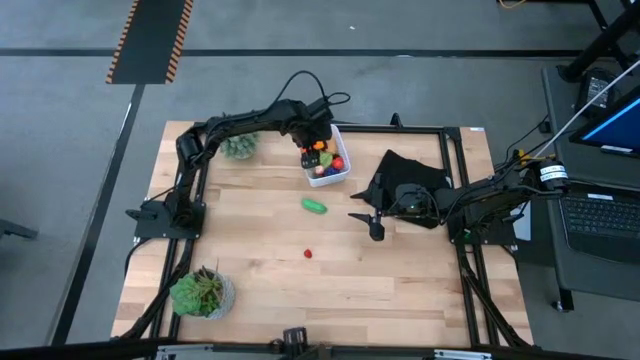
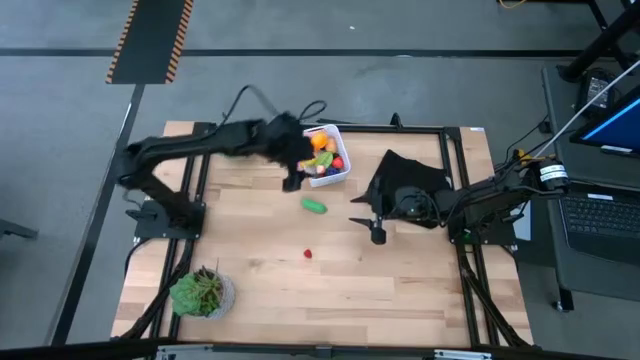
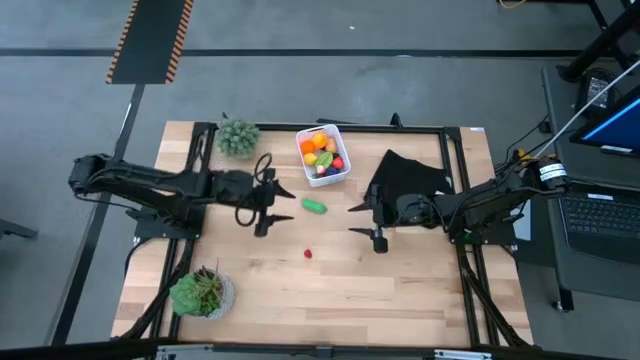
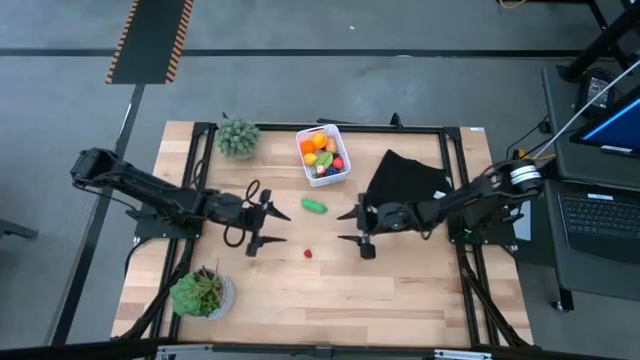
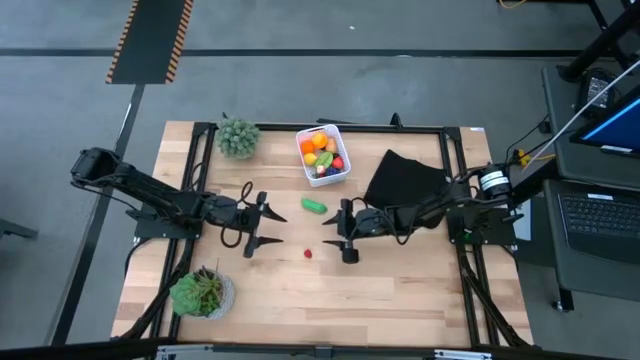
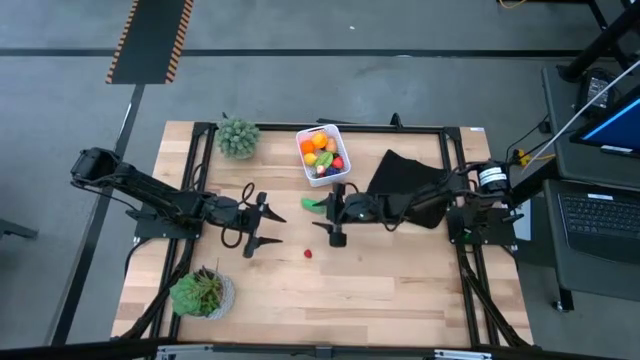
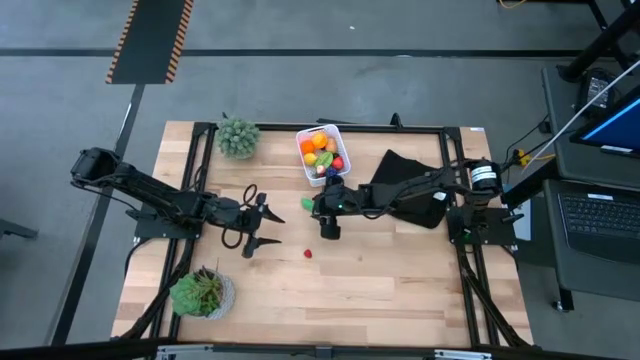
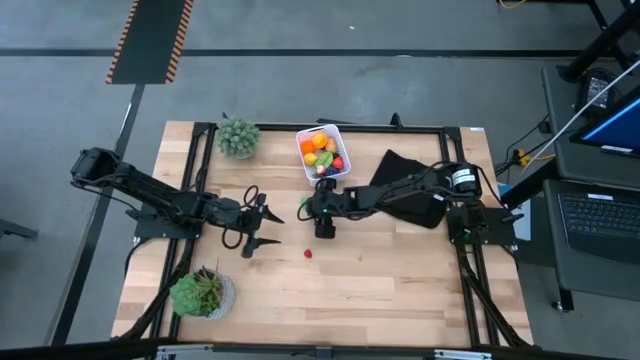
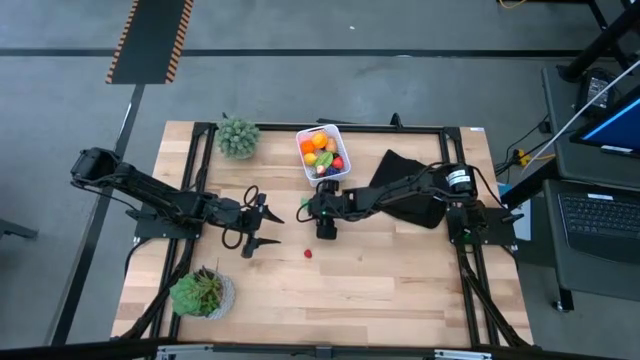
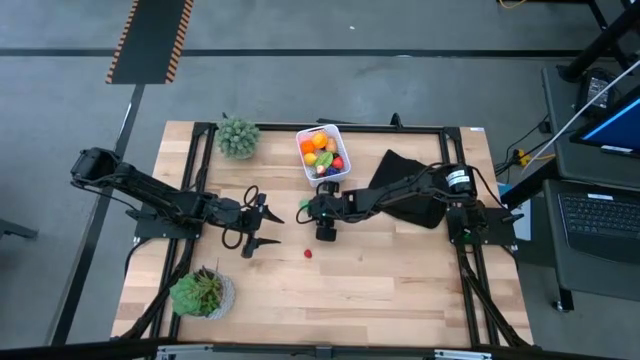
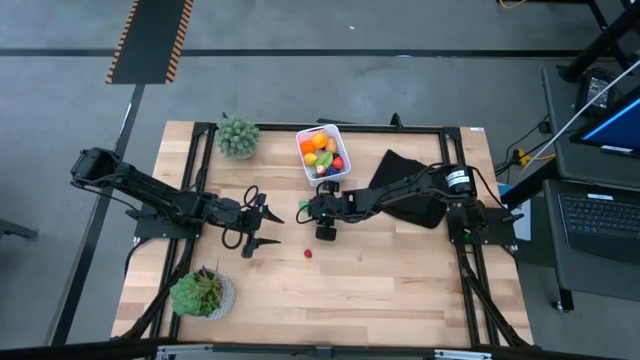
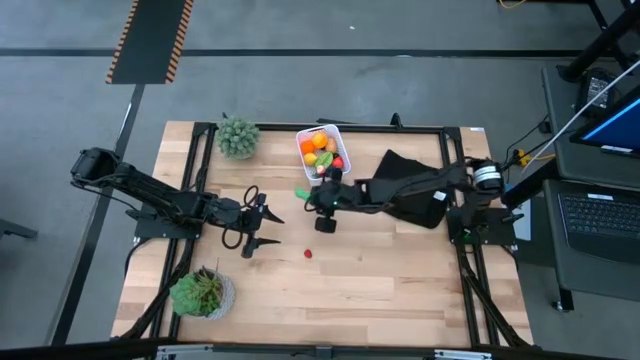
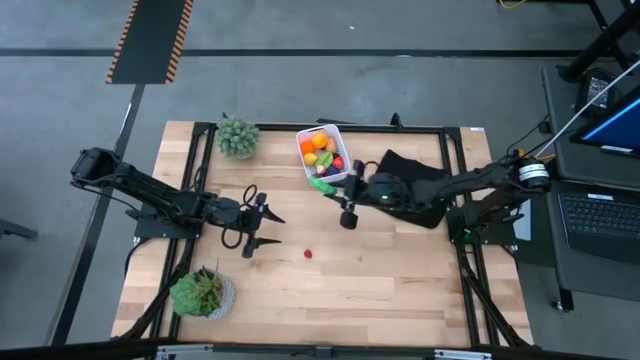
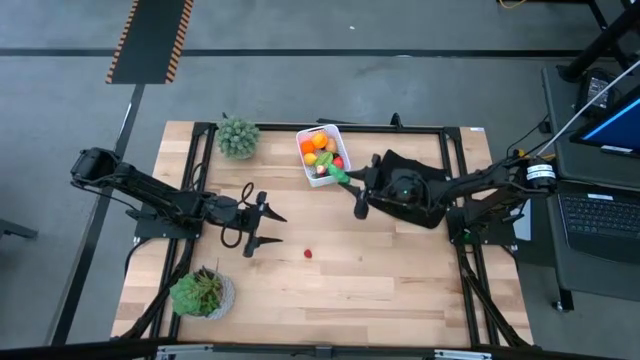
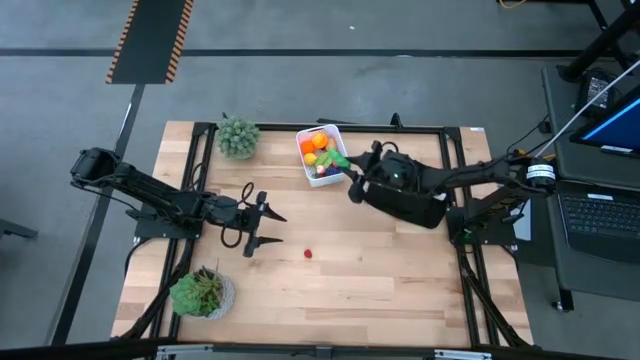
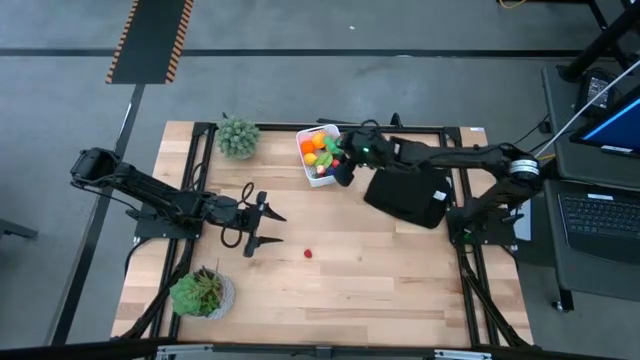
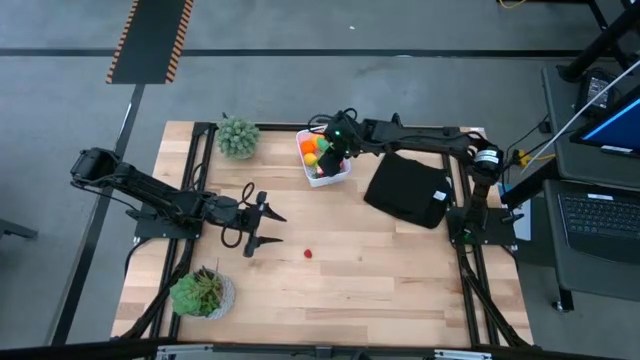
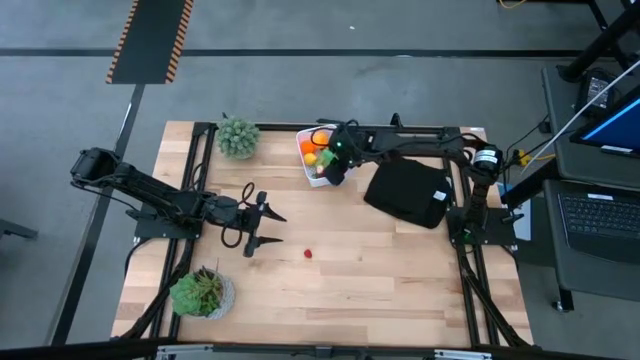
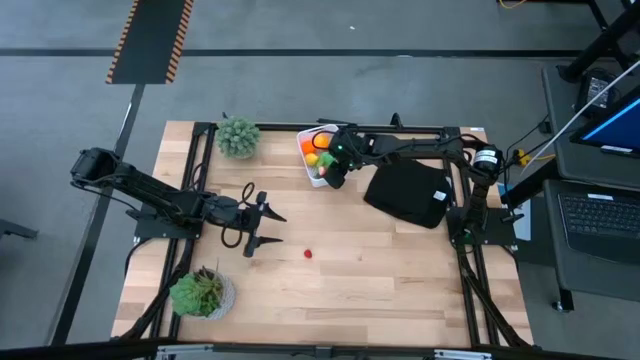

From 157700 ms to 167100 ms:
Task: Pick and placing Produce into tupperware
Put the pea into the basket

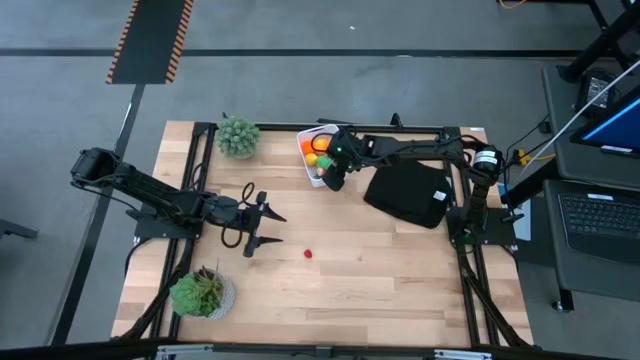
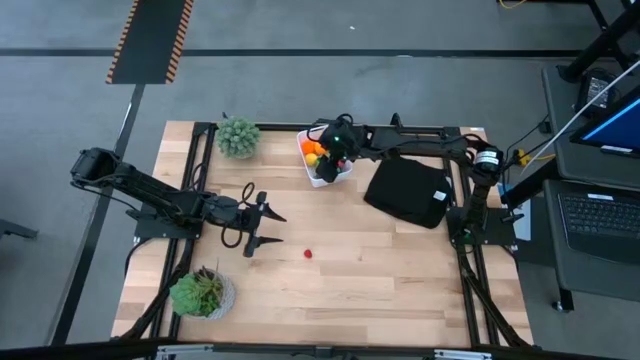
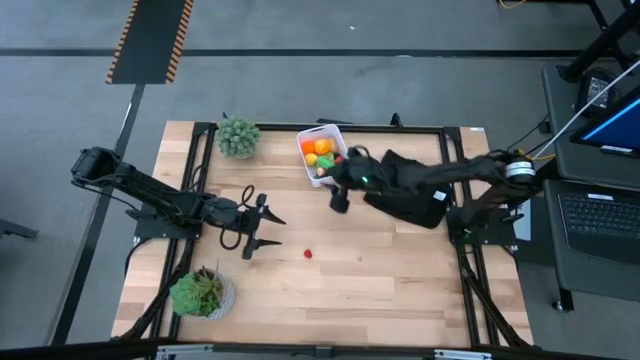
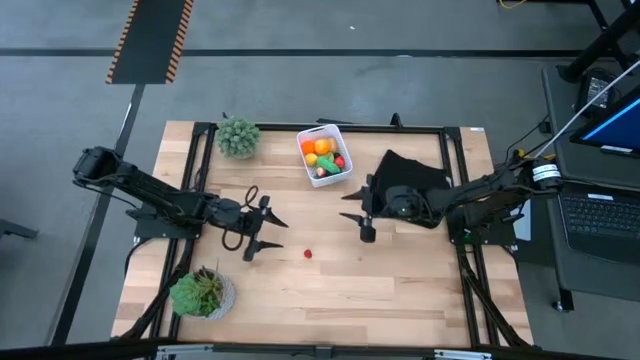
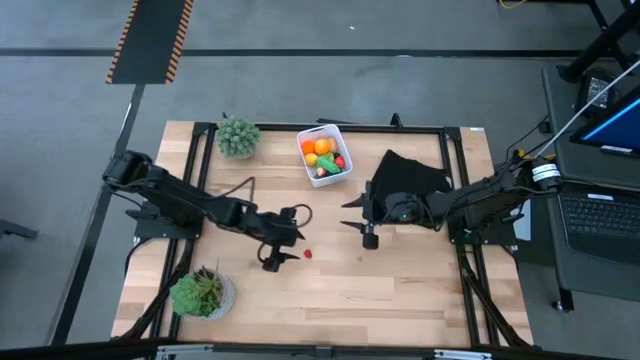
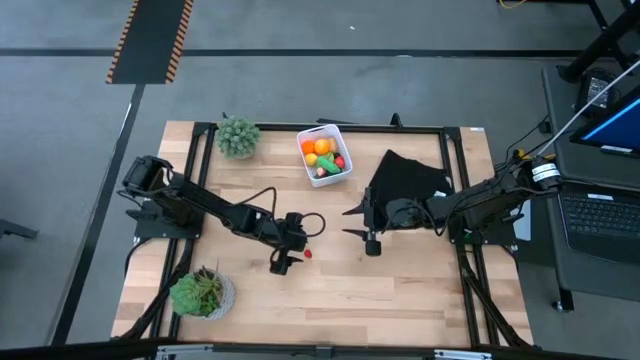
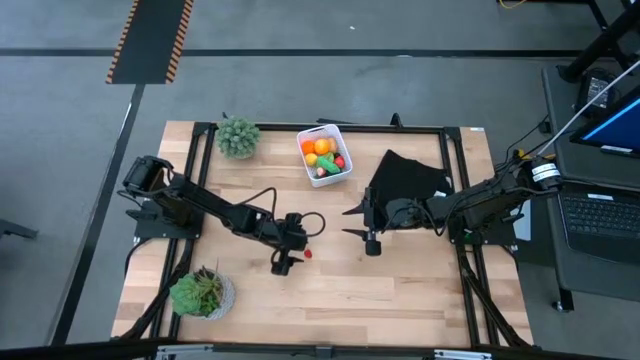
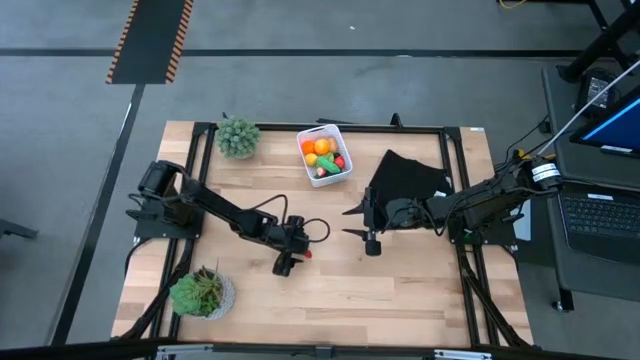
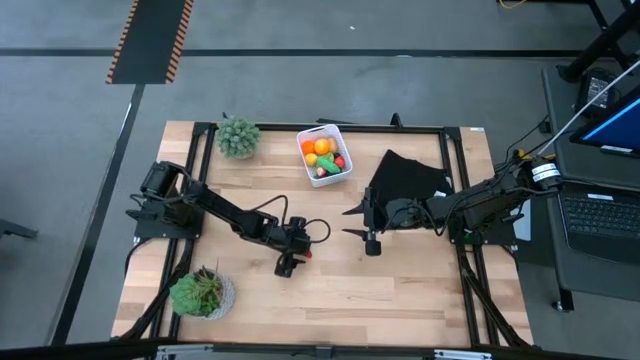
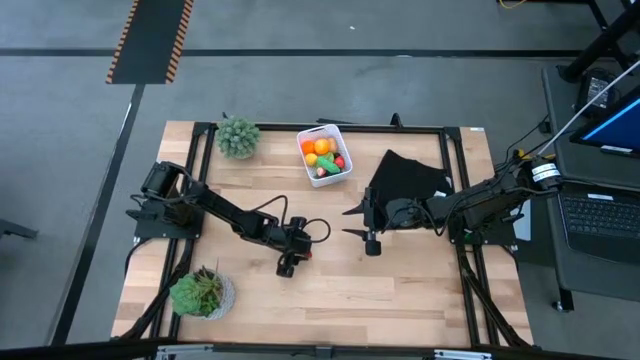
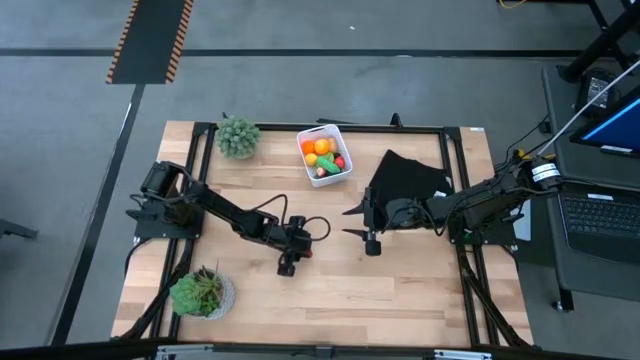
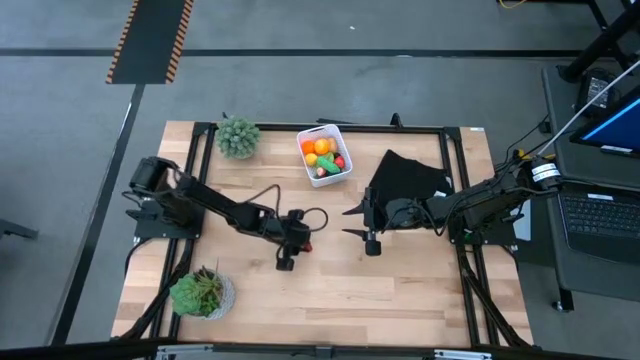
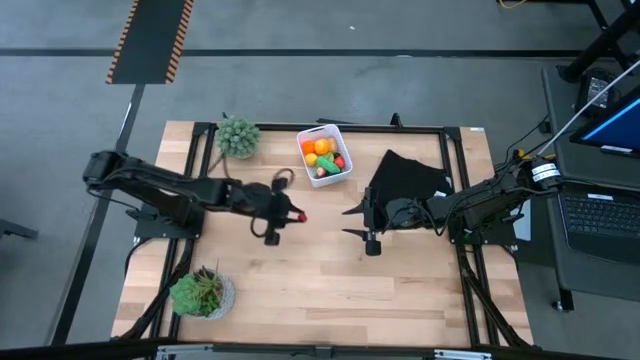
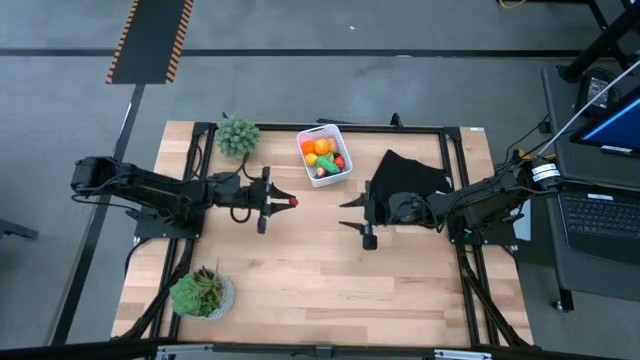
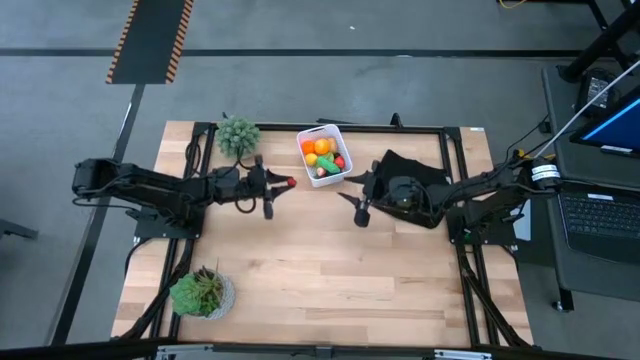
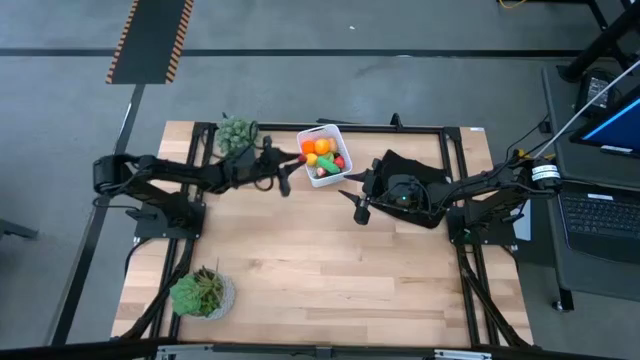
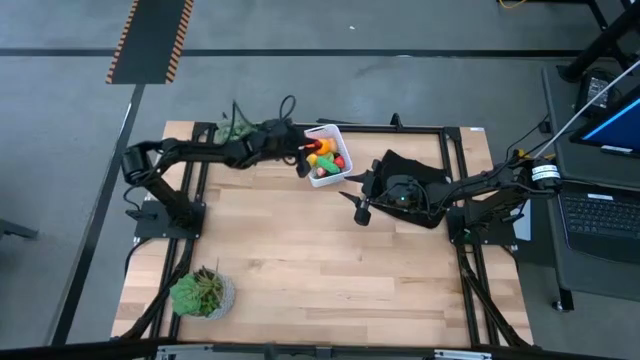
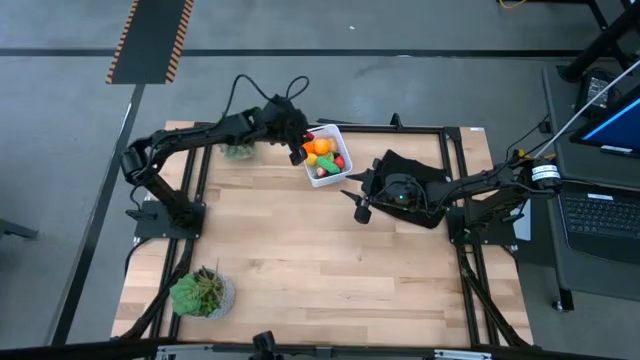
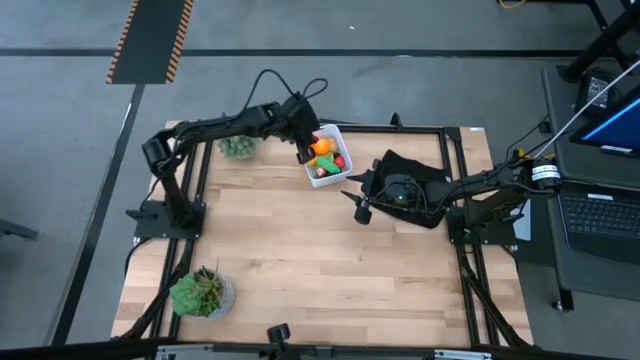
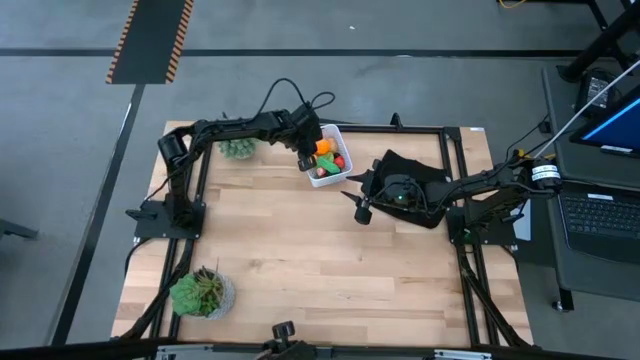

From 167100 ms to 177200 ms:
Put the raspberry into the basket

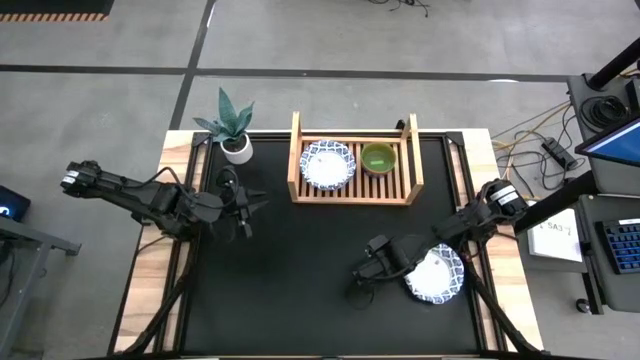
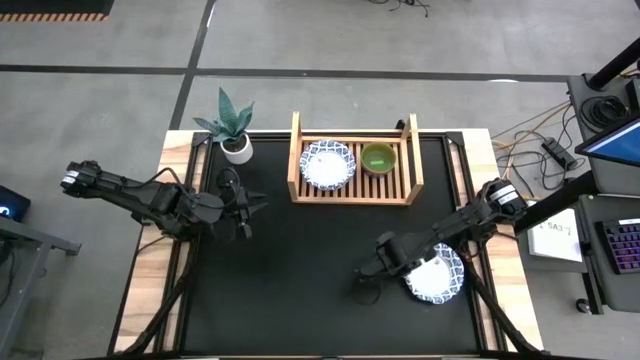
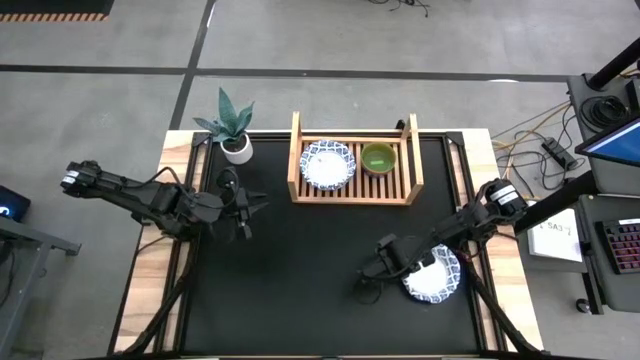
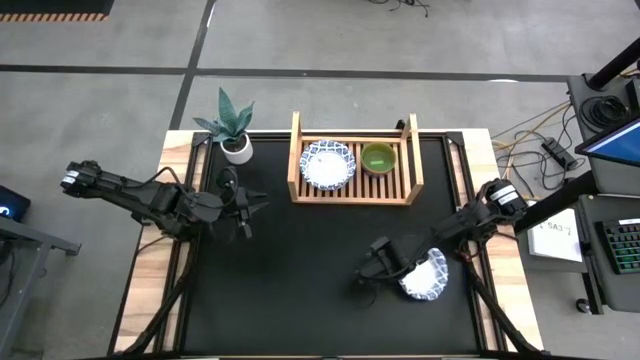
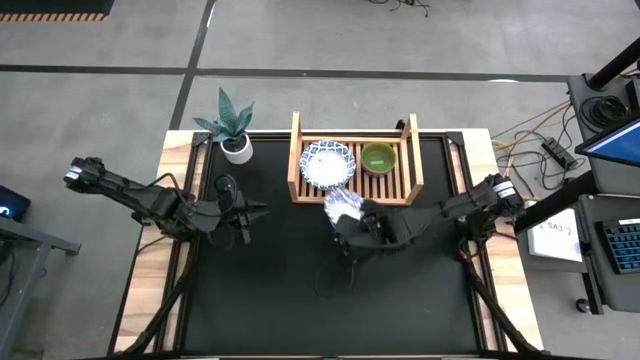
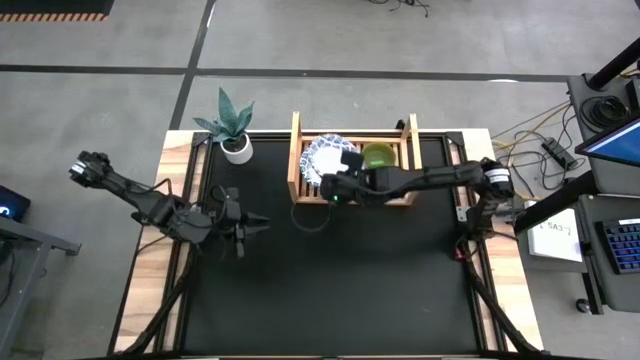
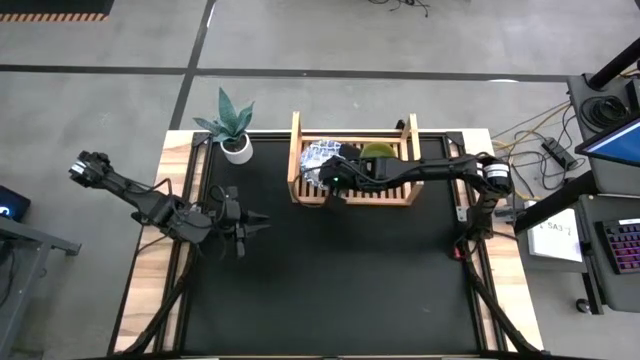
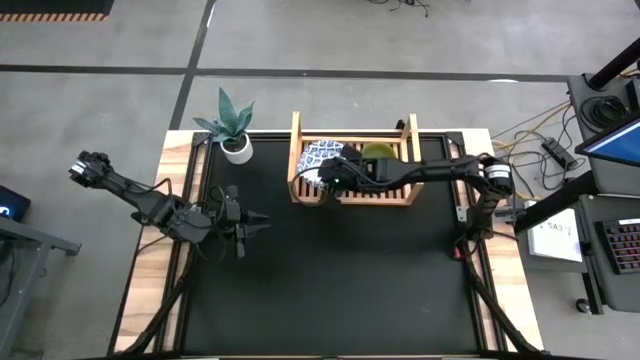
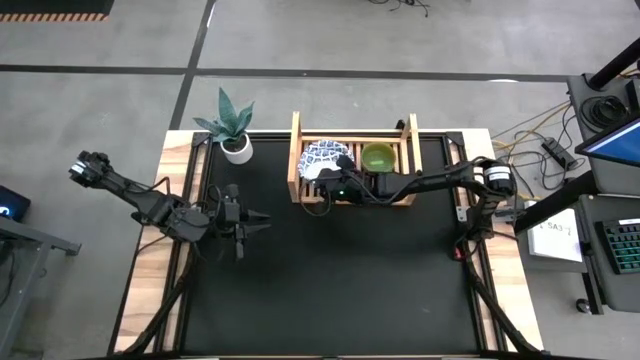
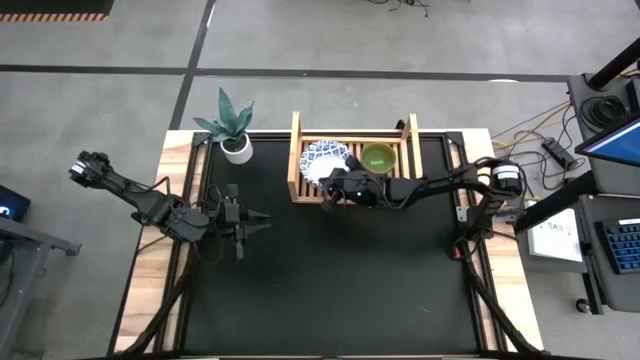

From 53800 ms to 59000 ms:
Task: Place and stack bowls onto a shelf
Stack the blue patterned bowl on top of the blue patterned bowl on the shelf
